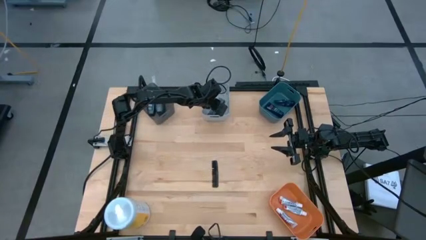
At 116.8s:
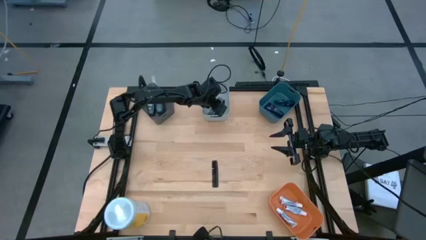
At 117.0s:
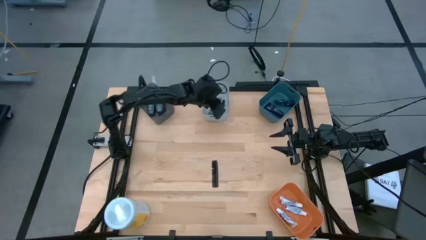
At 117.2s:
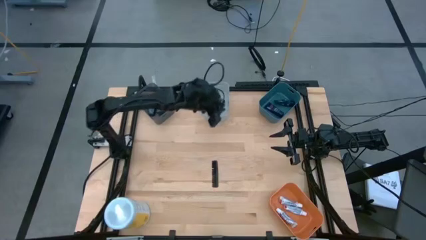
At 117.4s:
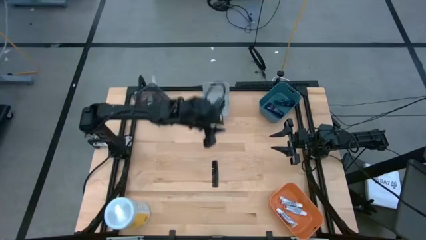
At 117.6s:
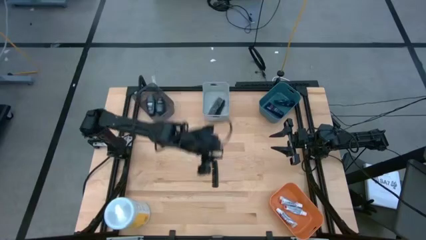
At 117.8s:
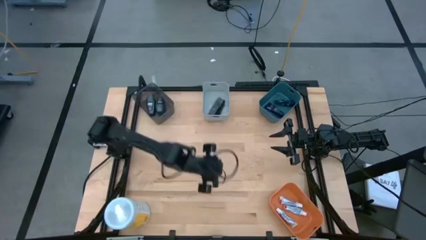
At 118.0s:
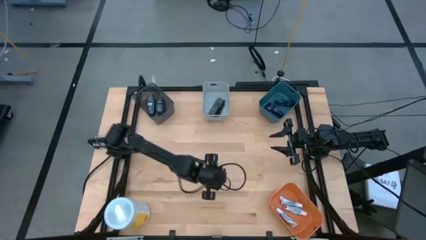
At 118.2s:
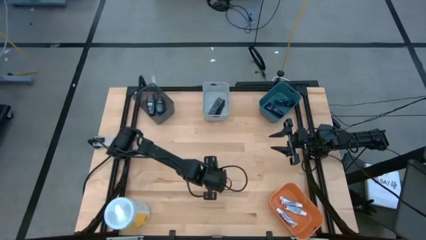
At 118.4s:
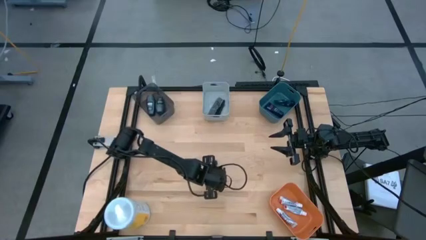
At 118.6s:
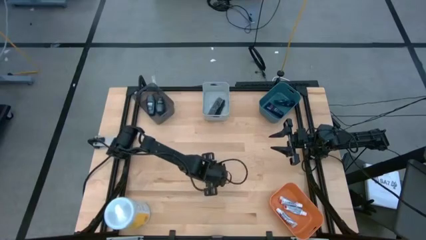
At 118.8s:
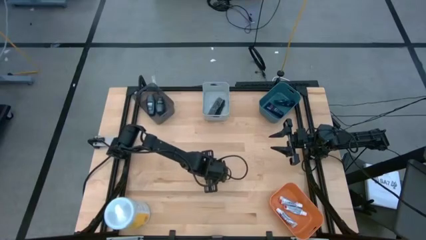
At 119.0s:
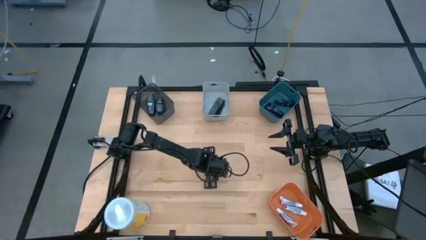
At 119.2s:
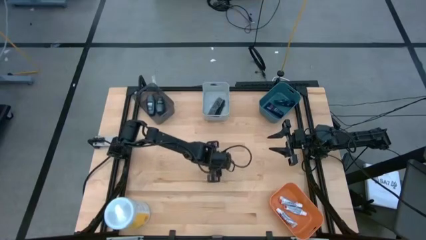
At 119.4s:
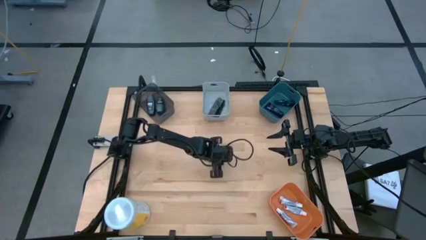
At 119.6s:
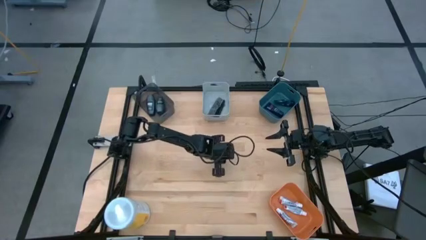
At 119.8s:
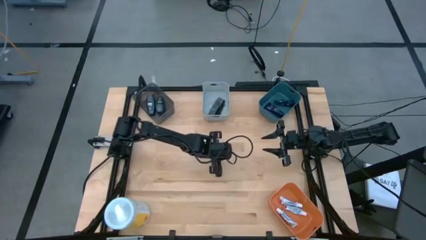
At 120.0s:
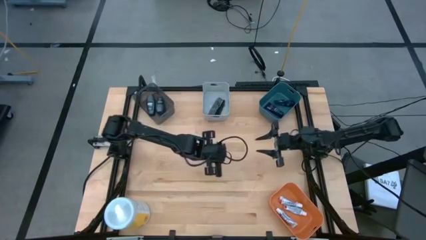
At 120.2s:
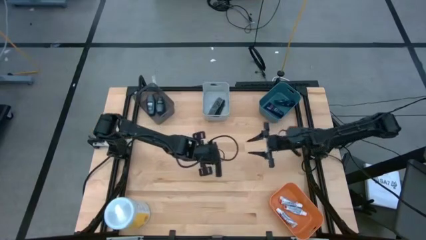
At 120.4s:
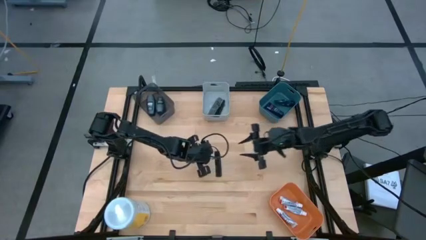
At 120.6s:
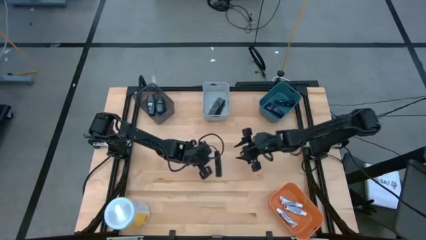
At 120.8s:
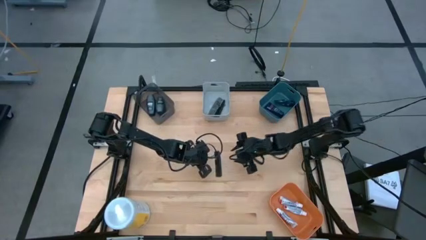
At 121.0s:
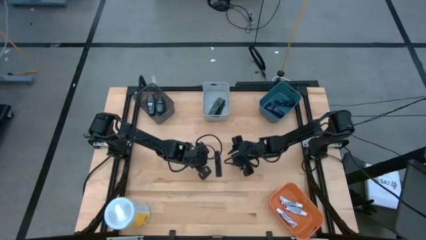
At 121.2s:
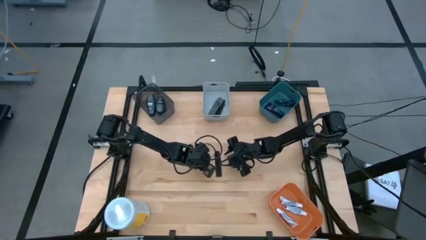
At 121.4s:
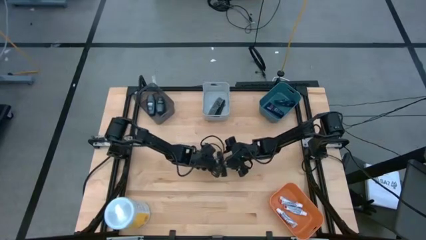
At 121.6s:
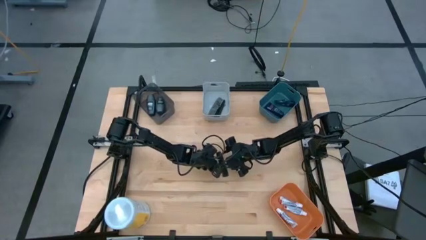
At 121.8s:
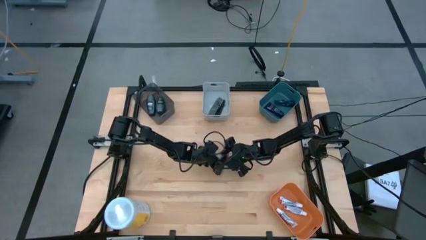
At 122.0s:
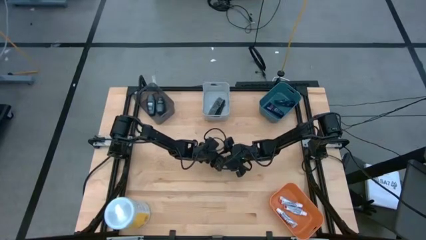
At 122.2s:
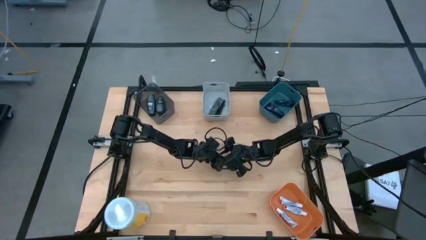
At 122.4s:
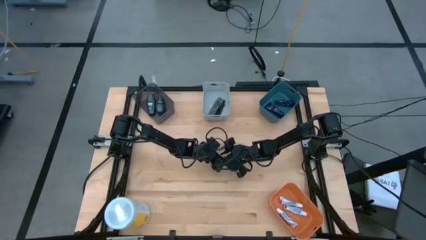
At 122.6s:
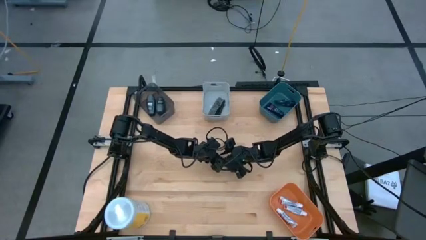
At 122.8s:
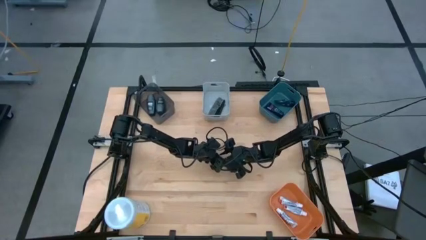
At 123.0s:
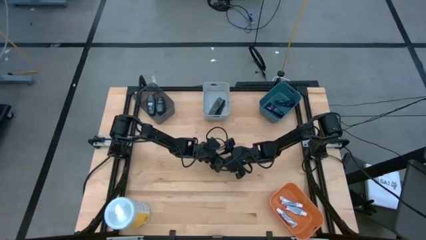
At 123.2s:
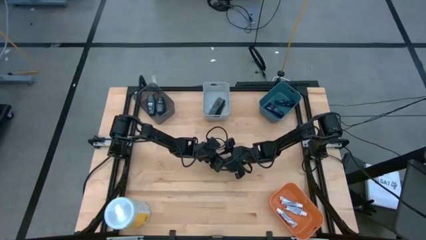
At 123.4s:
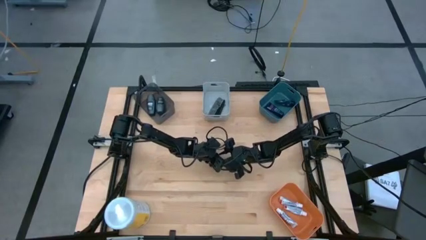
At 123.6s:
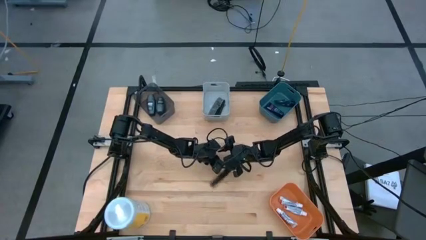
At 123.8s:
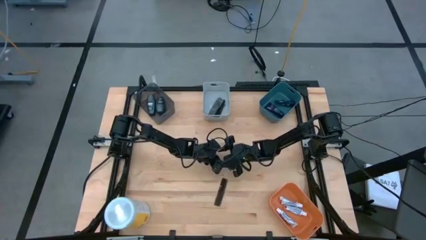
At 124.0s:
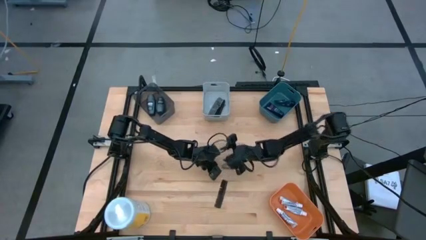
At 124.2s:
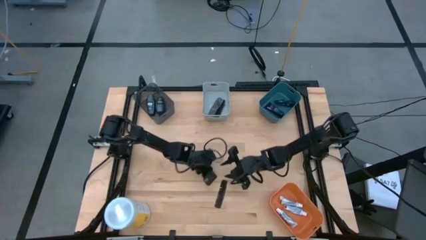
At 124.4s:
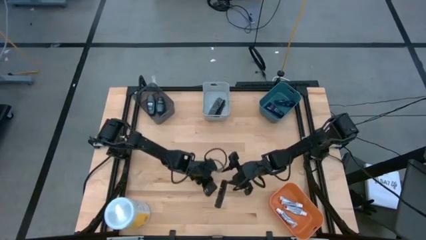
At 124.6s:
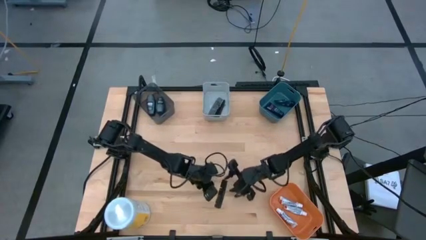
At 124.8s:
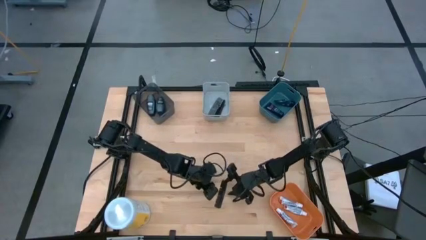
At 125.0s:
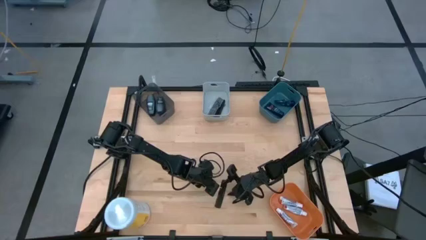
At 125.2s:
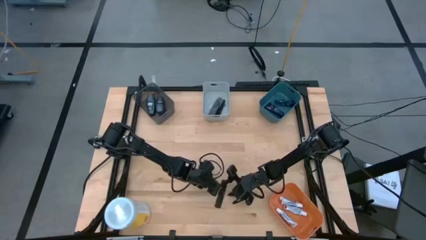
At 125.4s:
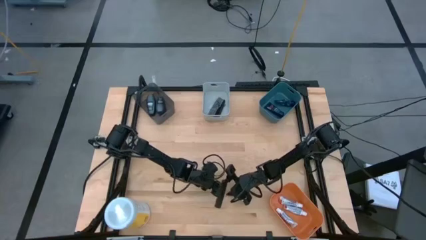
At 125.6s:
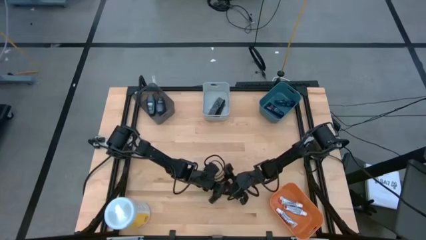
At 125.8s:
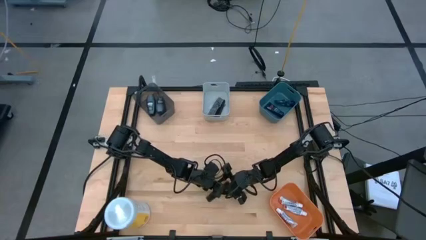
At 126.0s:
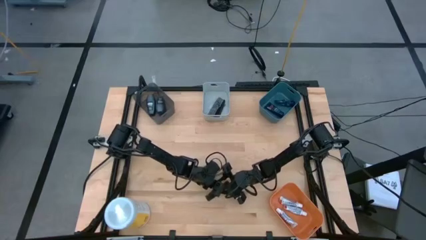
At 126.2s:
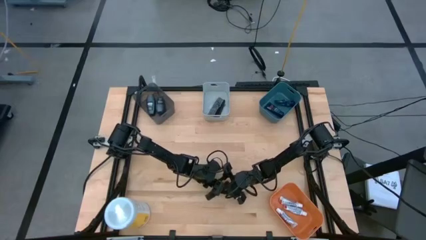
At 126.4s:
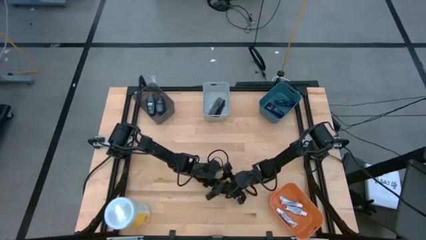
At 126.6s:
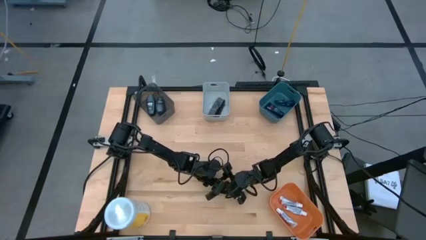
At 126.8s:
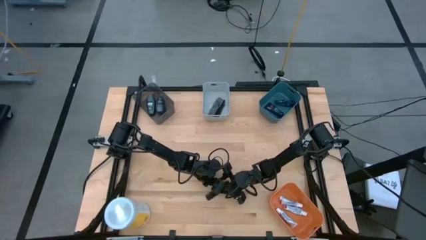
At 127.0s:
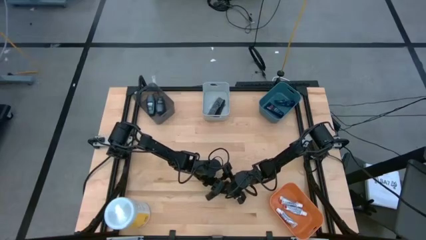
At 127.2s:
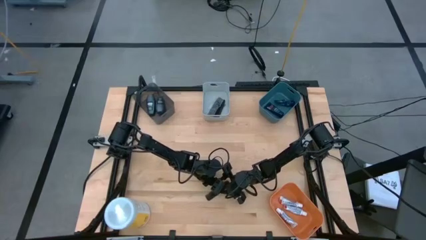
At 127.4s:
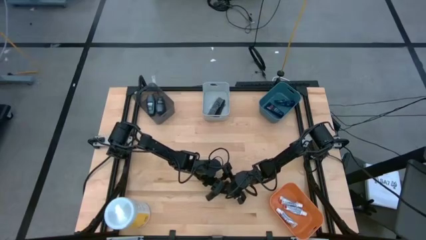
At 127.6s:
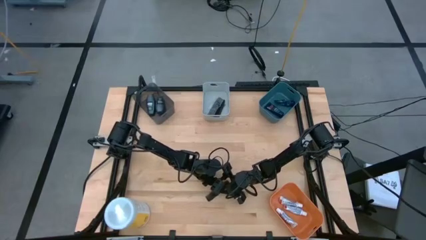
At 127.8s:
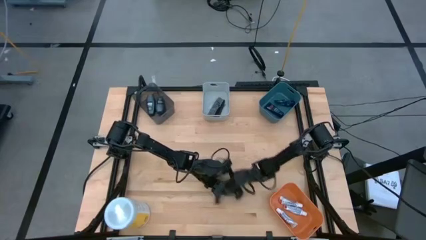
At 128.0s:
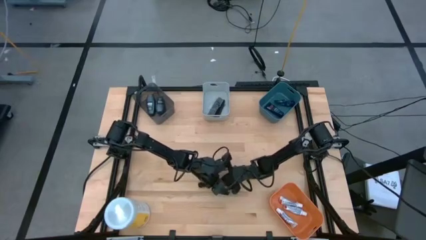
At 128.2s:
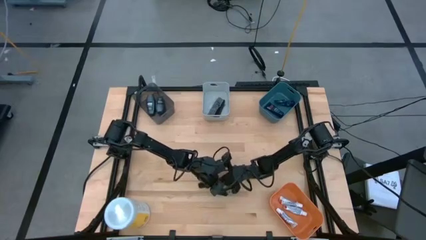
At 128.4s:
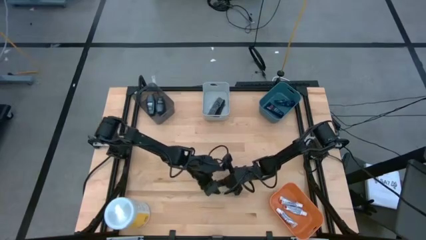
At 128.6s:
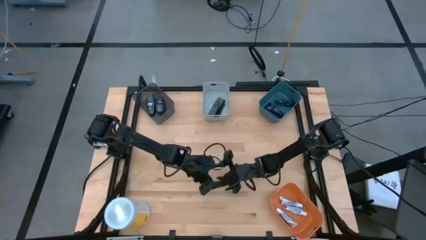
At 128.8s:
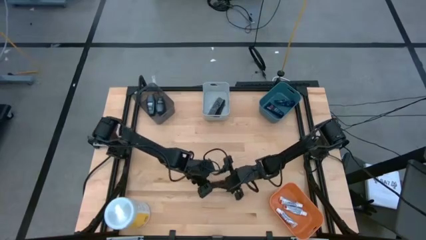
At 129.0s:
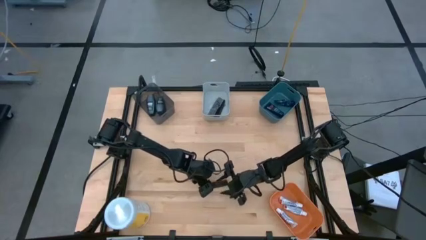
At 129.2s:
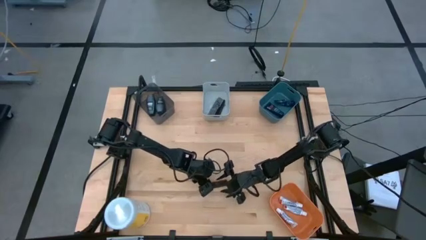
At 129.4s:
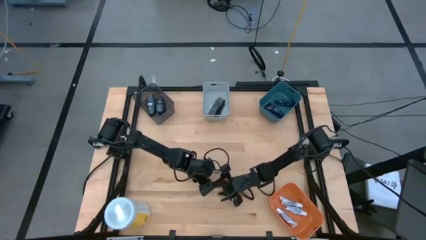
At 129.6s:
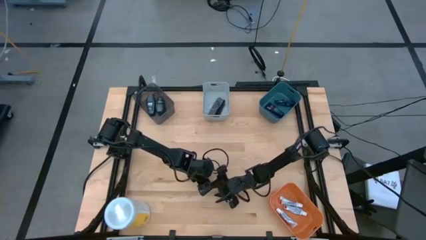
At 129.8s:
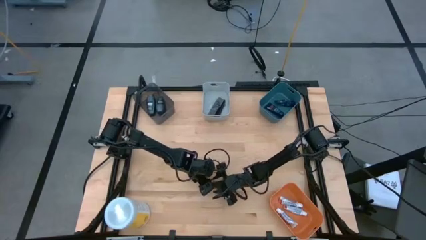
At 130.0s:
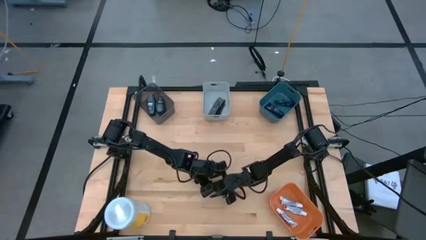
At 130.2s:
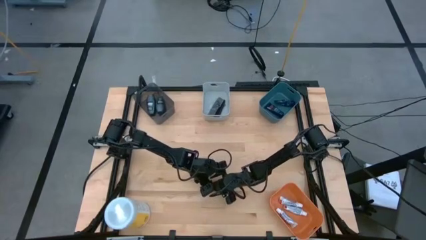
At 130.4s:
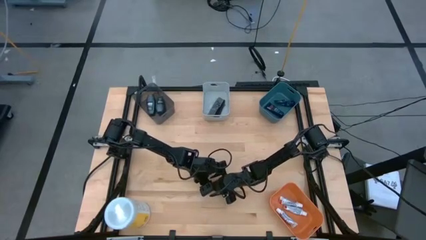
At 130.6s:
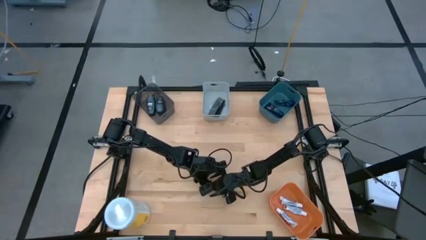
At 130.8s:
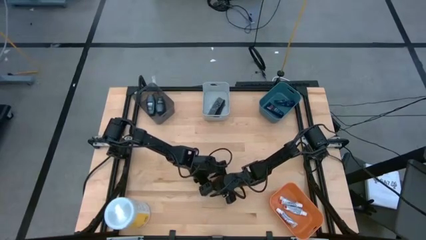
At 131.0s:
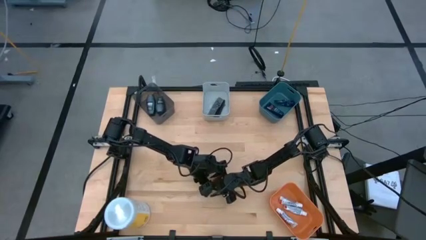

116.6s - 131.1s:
Task: Pick & Place Travel size toiletries
Put the black comb into the gray bin

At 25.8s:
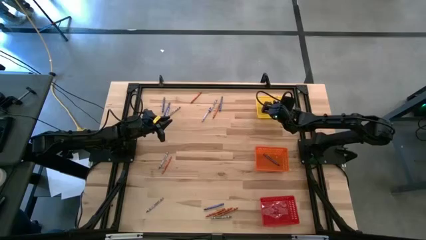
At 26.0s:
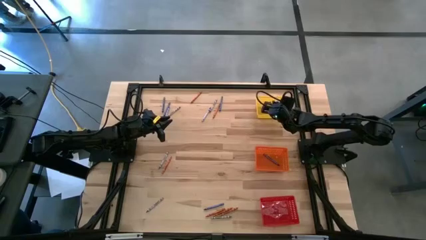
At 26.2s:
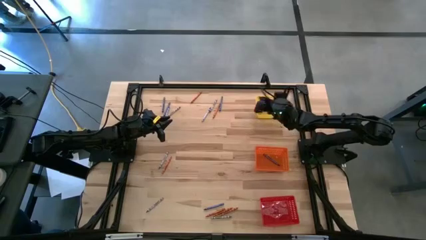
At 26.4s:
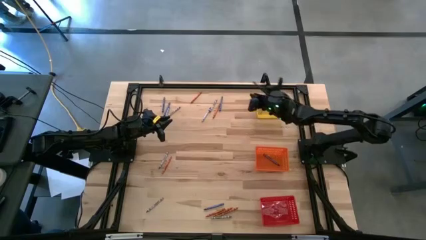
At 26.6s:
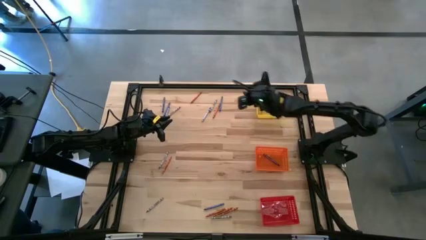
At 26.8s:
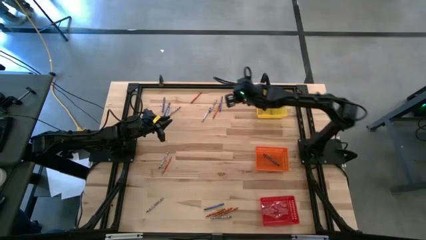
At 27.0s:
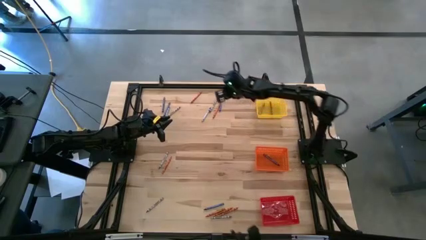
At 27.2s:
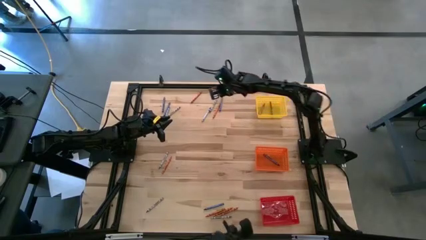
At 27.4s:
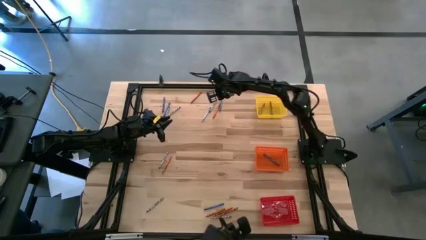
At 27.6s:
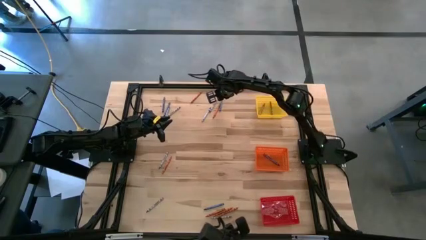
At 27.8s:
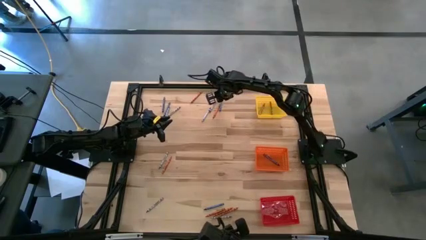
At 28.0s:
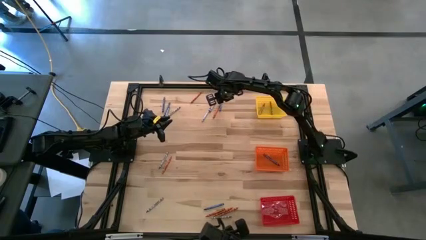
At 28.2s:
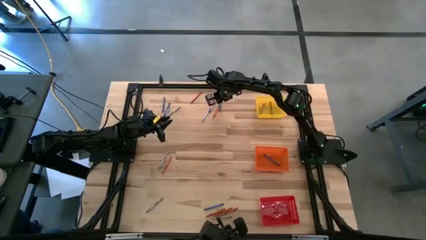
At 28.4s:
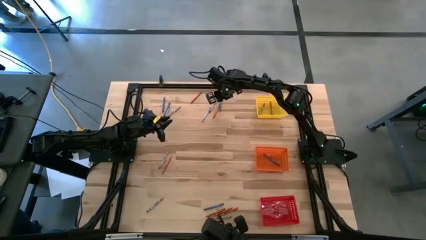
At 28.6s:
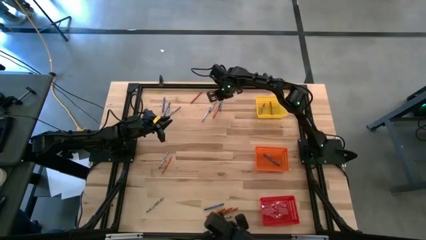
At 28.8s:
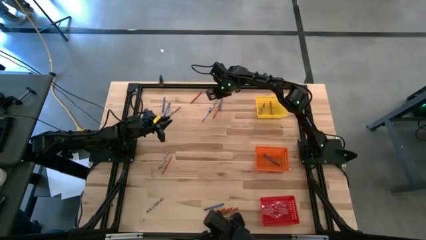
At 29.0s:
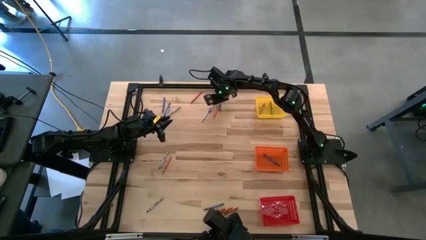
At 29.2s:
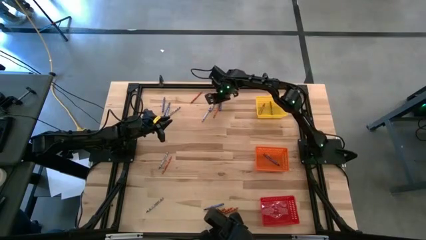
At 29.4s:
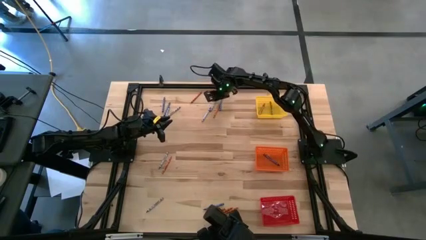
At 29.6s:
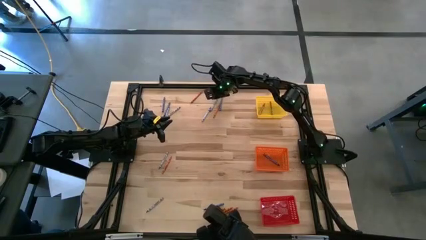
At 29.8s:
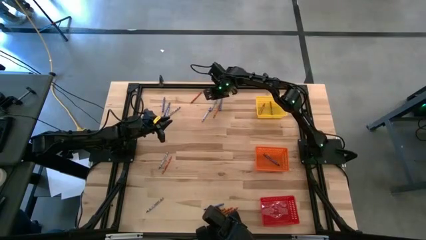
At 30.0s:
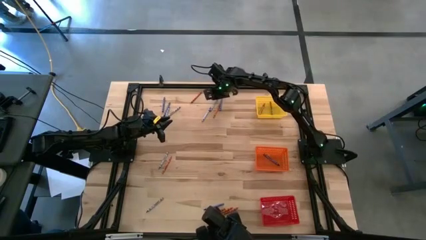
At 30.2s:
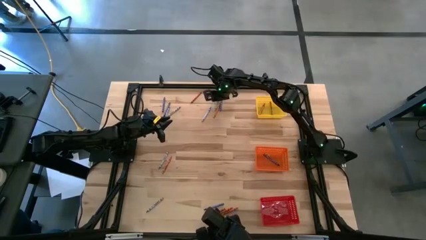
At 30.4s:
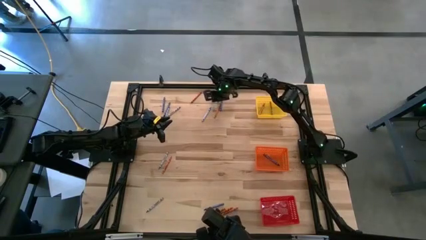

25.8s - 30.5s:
Task: Sort crayons
Put the gray crayon into the red bin
